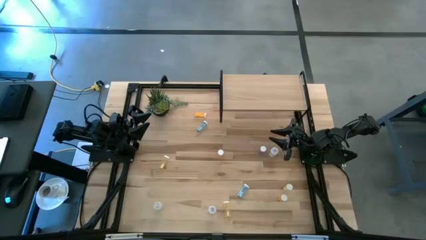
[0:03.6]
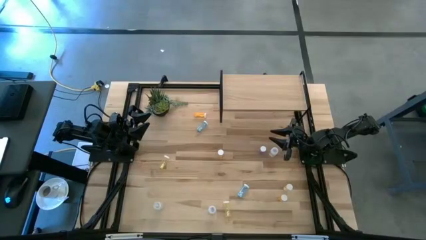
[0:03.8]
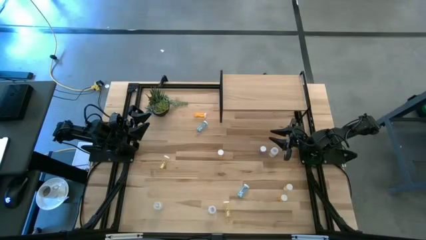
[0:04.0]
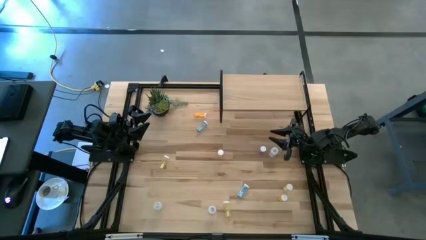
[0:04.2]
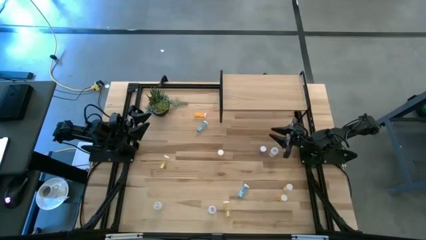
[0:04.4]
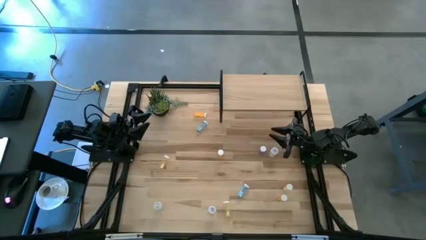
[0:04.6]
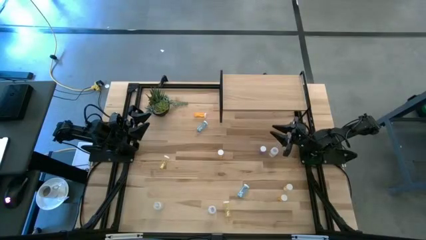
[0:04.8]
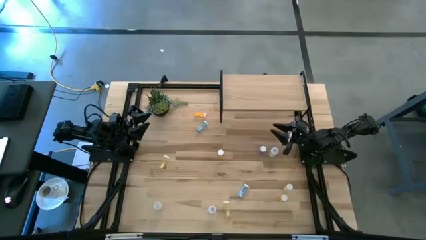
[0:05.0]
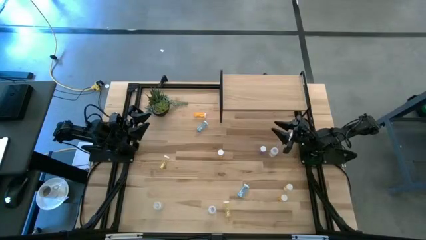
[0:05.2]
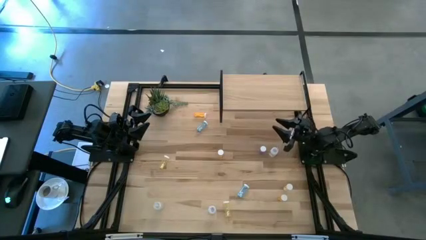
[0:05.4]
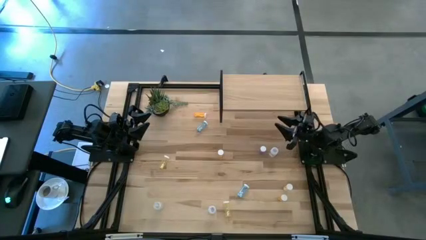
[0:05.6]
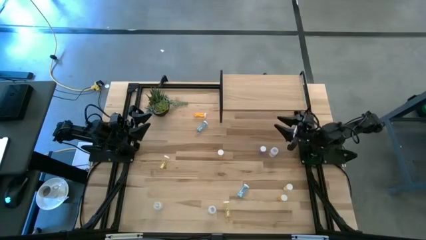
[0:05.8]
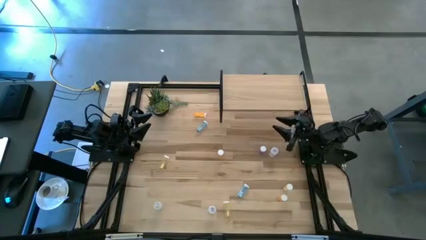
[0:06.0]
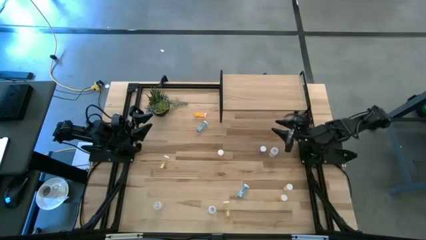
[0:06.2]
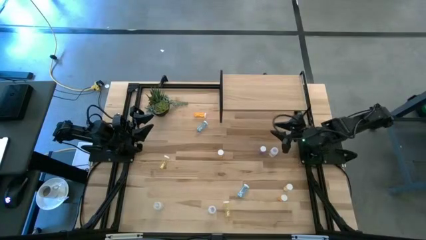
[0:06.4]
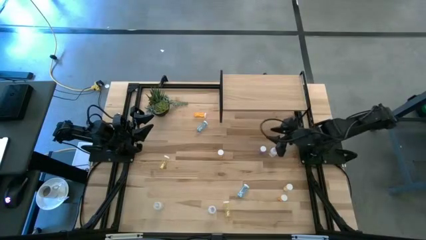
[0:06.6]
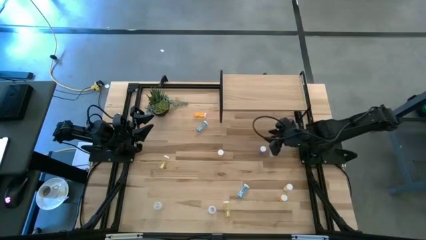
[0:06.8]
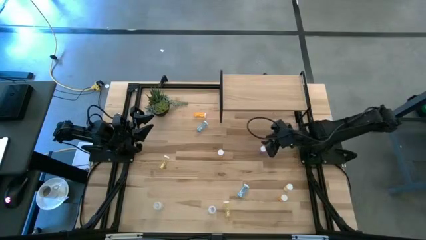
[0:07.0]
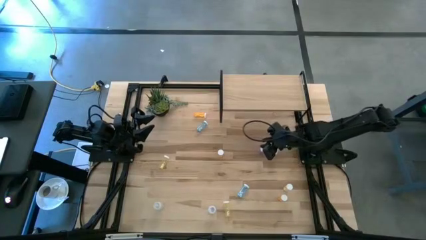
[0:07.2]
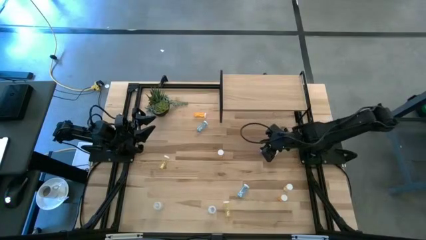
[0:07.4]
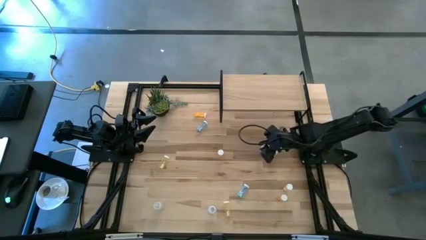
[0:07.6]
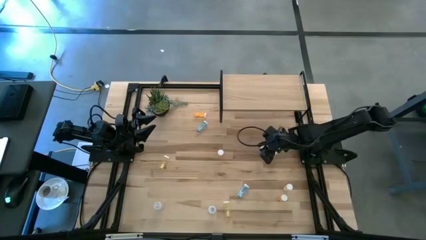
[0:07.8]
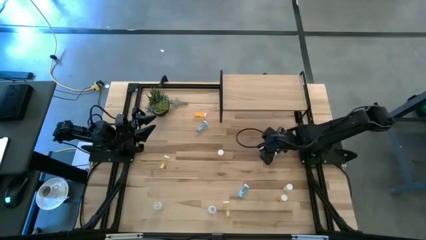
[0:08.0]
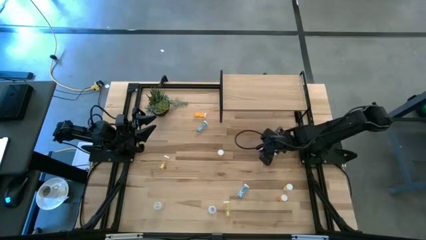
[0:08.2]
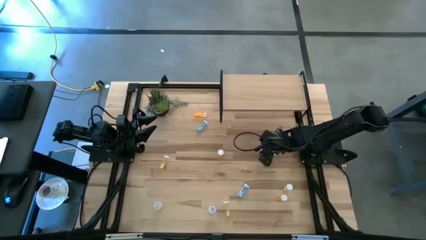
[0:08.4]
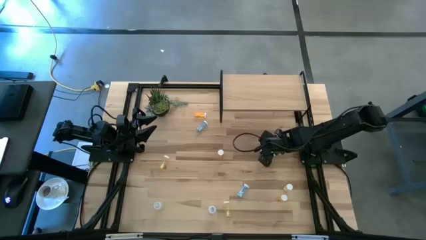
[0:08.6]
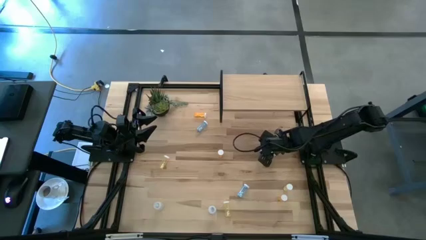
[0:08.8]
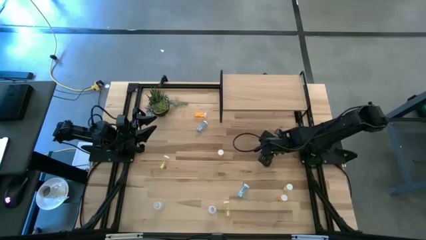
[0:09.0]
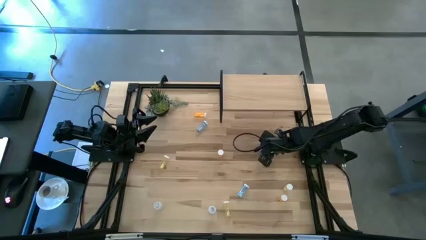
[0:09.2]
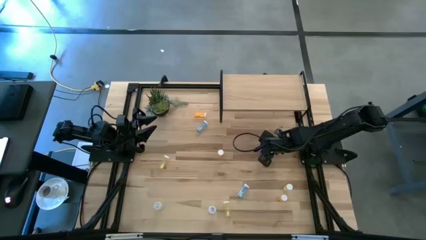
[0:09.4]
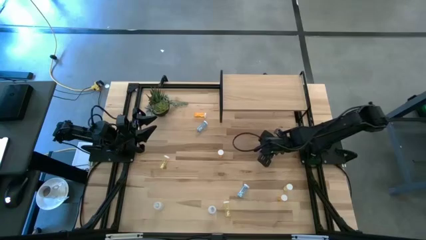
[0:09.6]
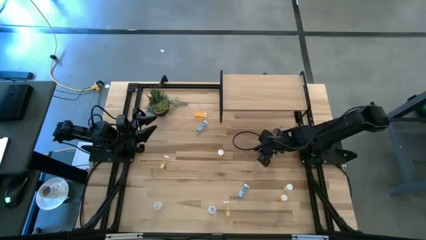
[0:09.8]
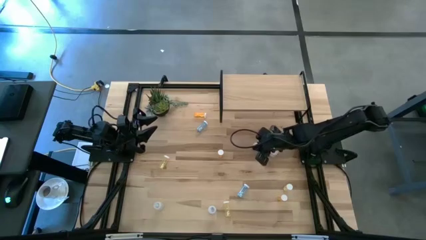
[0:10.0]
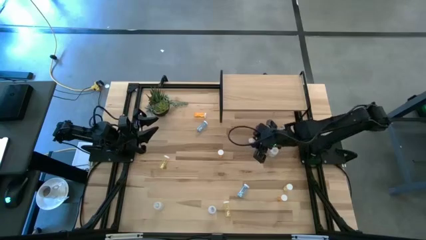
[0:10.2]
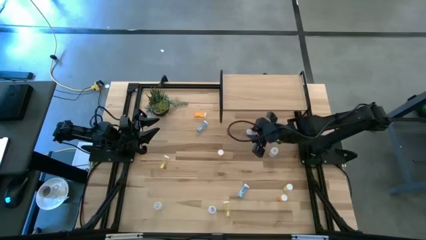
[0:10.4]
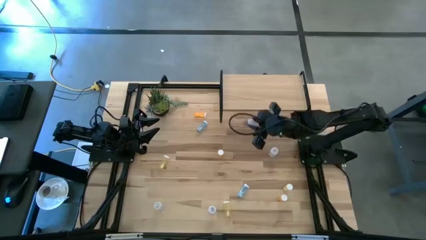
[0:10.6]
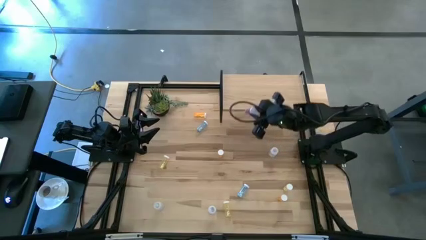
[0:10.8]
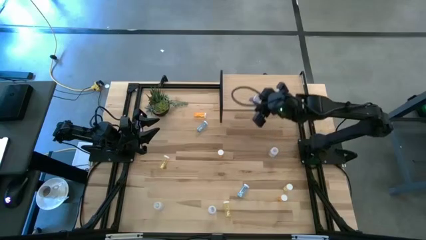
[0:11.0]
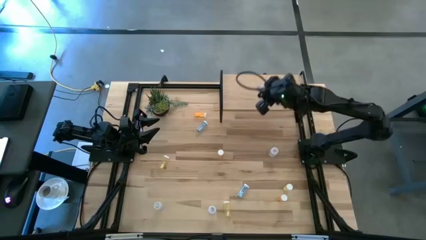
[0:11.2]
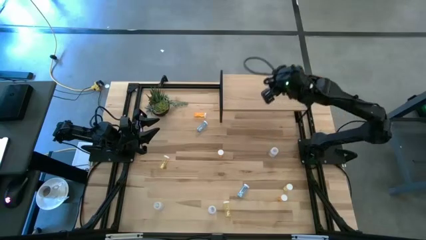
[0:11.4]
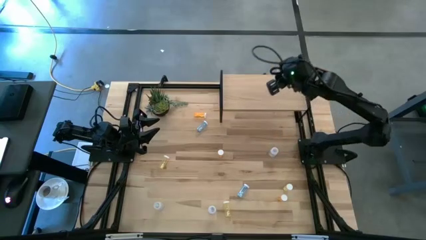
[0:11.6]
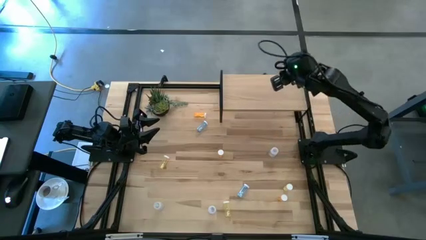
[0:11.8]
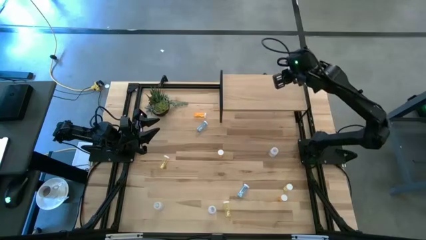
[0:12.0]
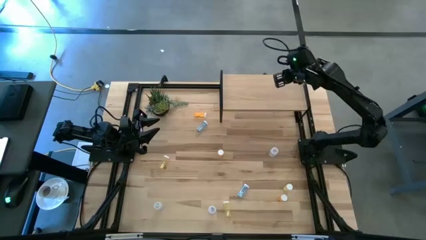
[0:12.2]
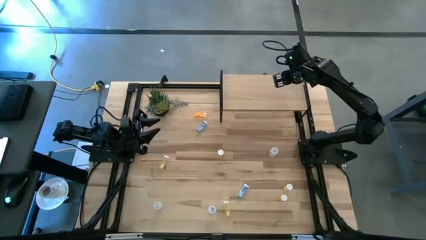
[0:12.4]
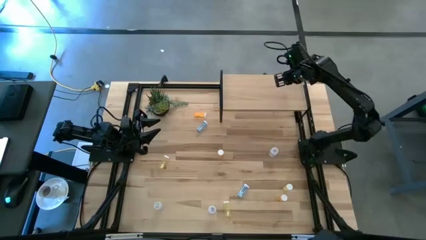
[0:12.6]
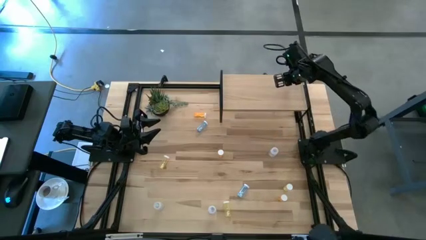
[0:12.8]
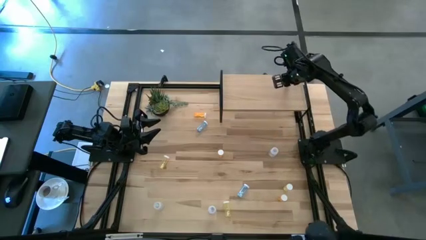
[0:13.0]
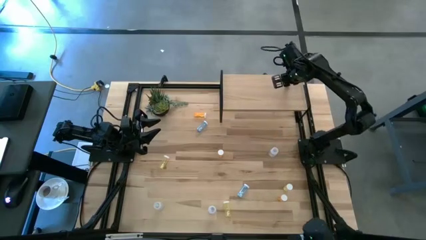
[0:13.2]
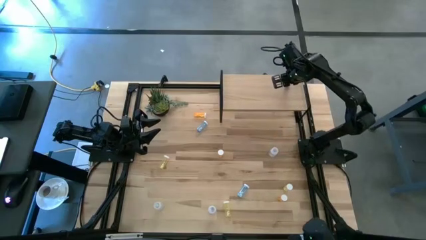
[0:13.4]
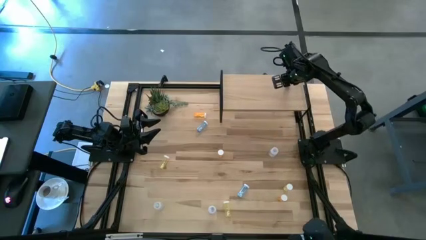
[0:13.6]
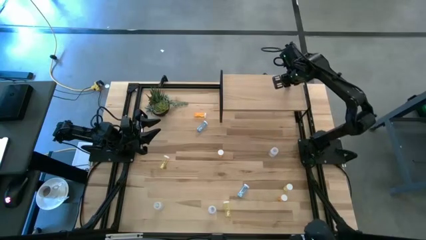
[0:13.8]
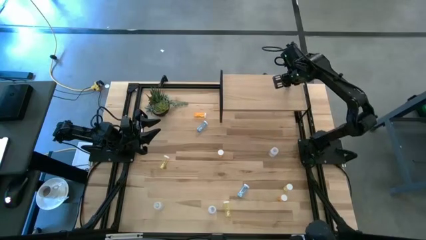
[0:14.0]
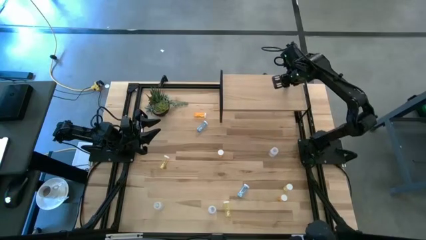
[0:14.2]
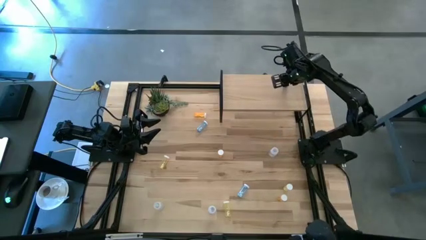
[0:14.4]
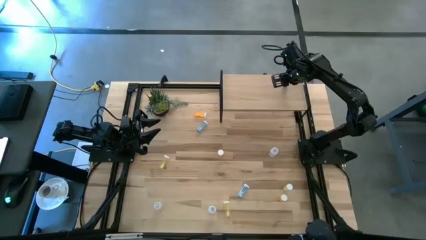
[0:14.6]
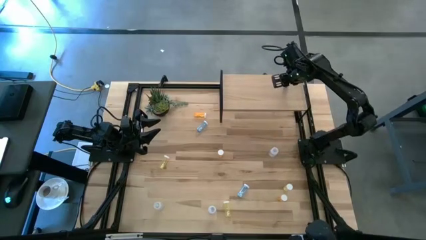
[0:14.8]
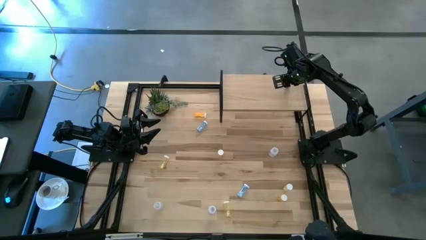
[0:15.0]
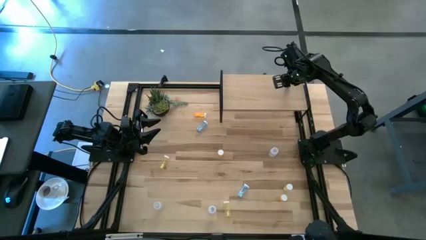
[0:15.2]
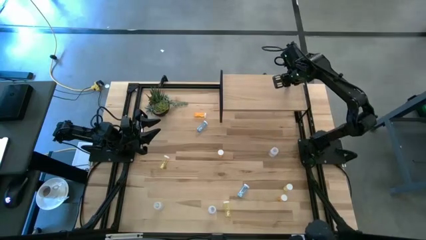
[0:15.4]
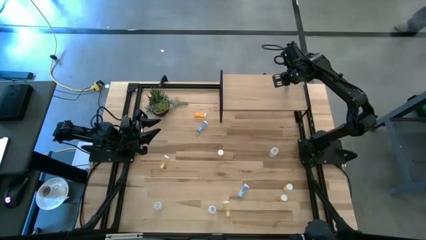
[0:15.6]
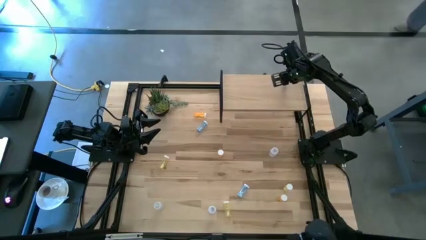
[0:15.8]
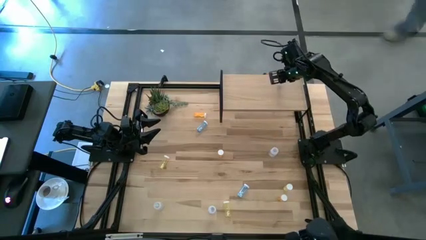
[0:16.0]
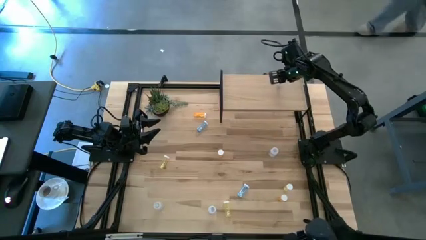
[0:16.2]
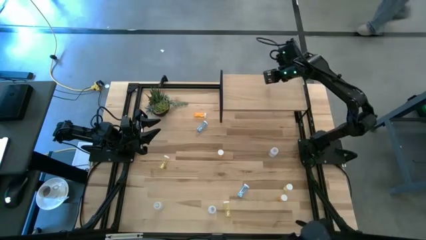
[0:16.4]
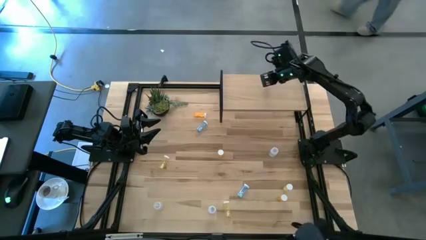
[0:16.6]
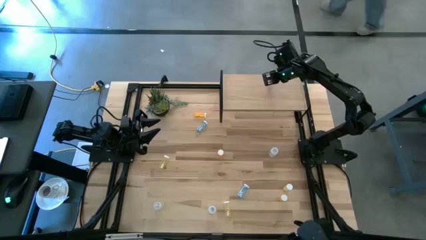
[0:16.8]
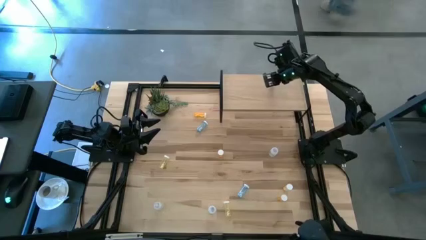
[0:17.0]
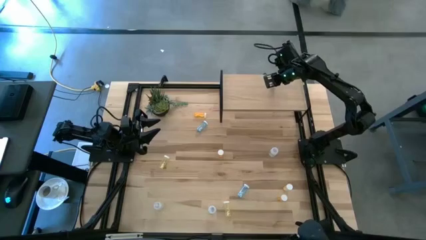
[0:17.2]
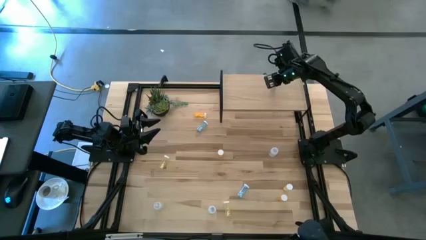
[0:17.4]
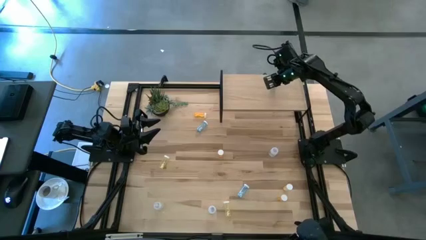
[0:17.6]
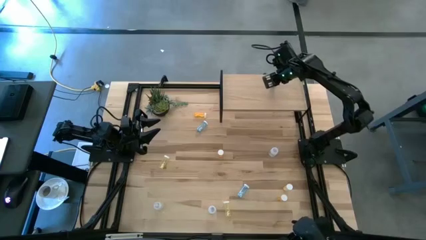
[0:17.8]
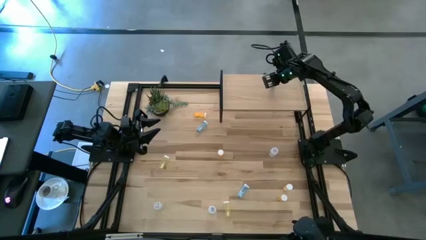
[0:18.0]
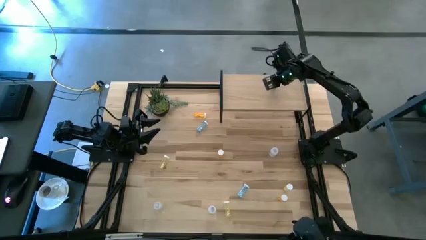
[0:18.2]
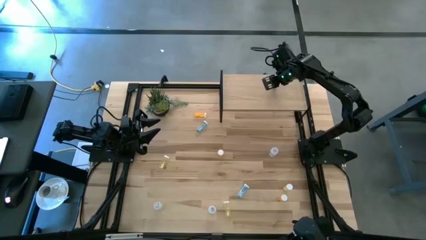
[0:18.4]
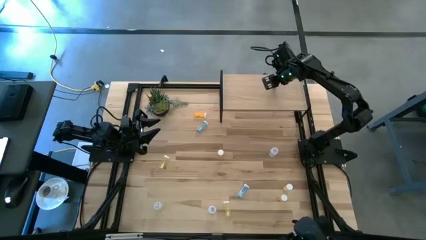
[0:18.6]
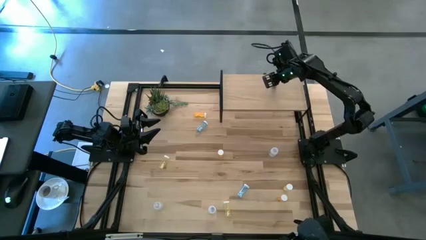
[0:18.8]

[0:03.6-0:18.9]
Task: Pick and place medicine bottles onto shelf by color
Put the right blue pill bottle on the shelf
